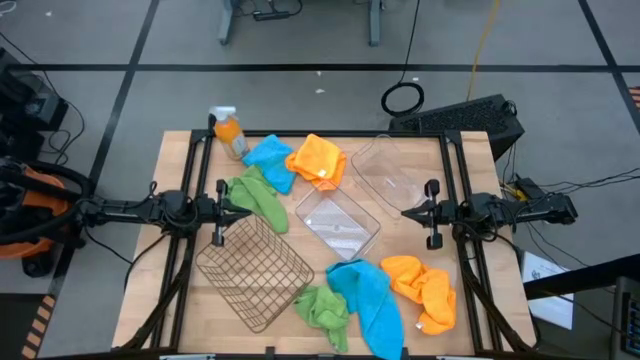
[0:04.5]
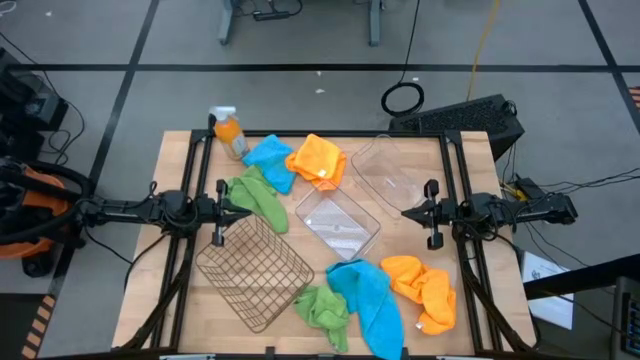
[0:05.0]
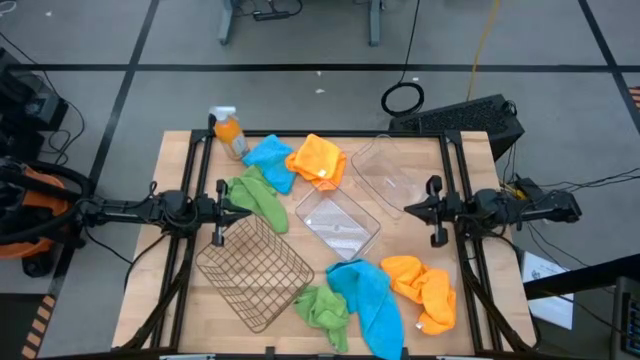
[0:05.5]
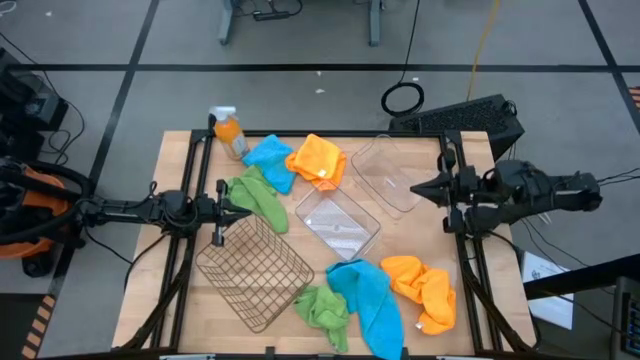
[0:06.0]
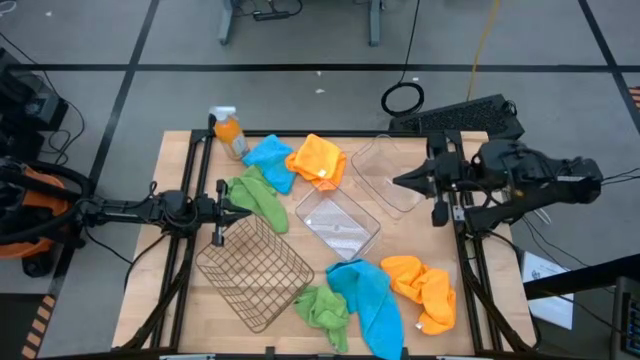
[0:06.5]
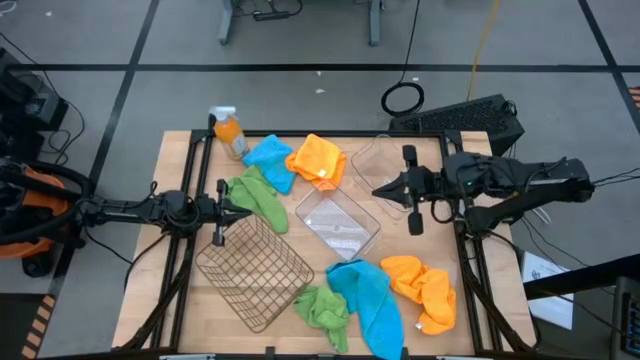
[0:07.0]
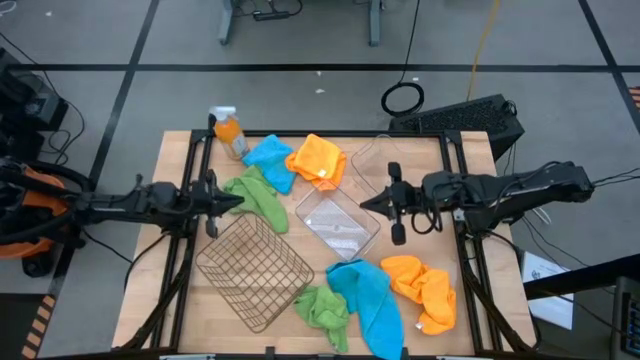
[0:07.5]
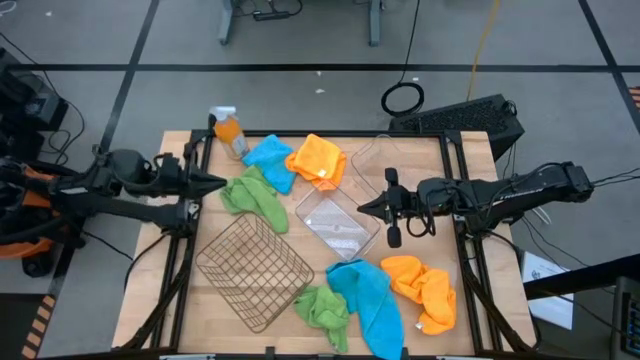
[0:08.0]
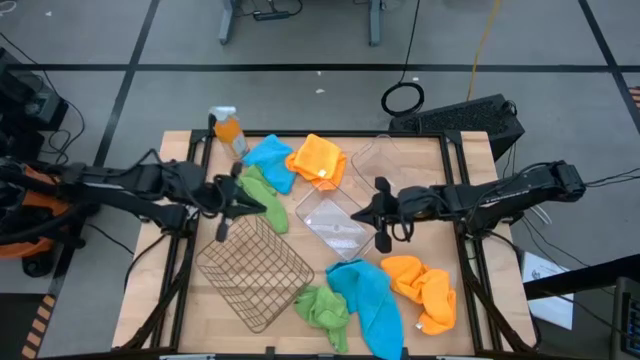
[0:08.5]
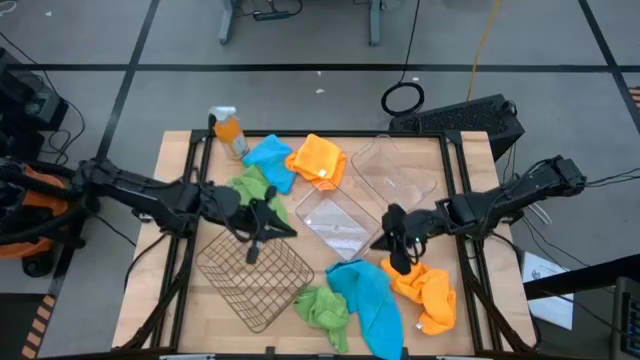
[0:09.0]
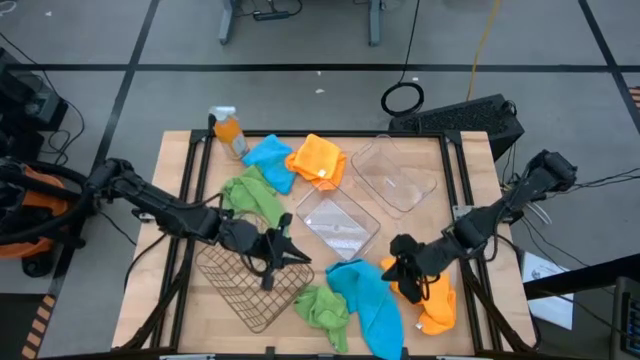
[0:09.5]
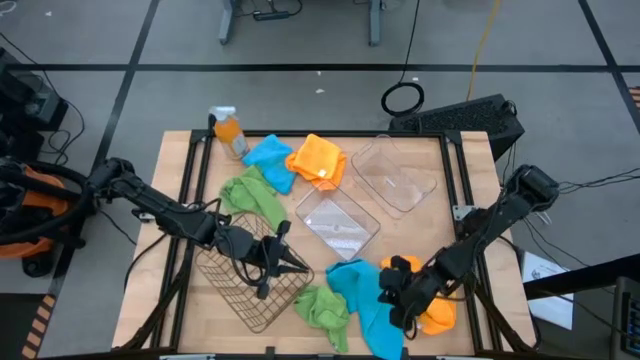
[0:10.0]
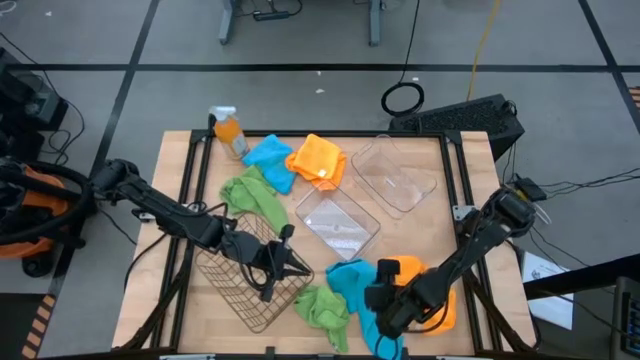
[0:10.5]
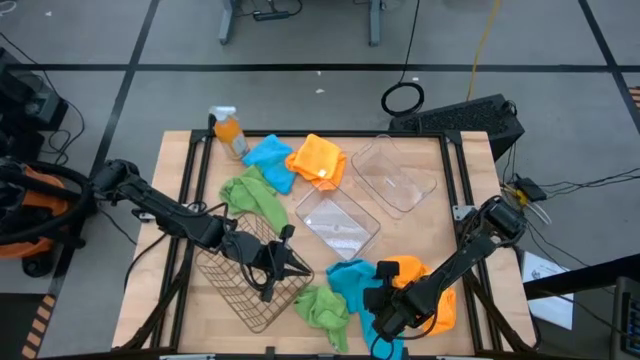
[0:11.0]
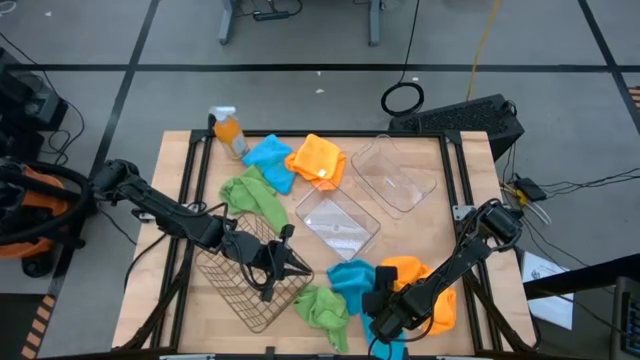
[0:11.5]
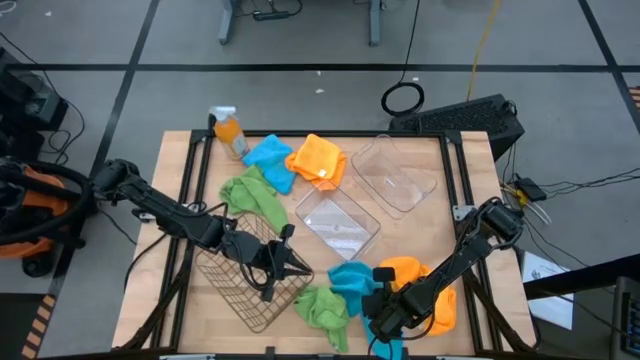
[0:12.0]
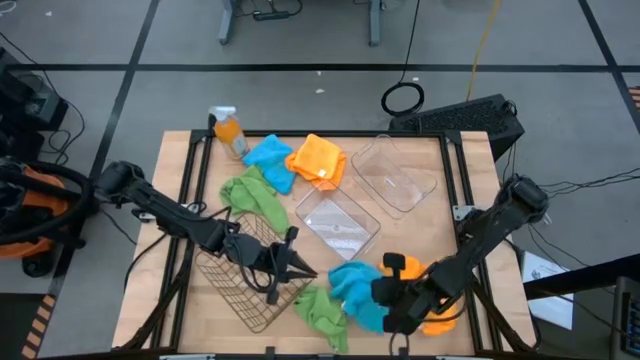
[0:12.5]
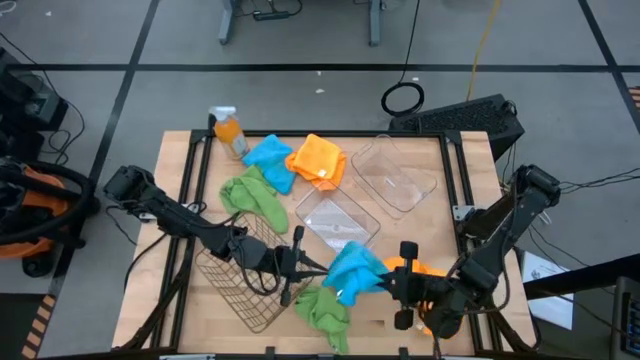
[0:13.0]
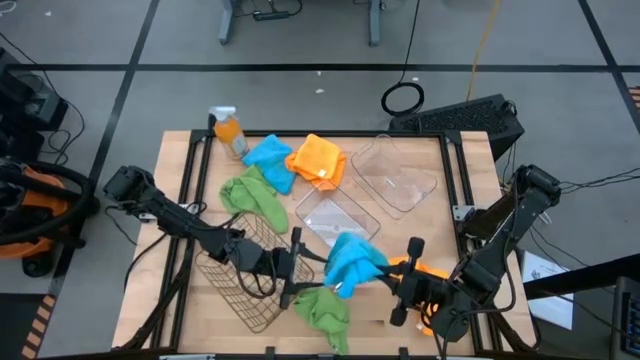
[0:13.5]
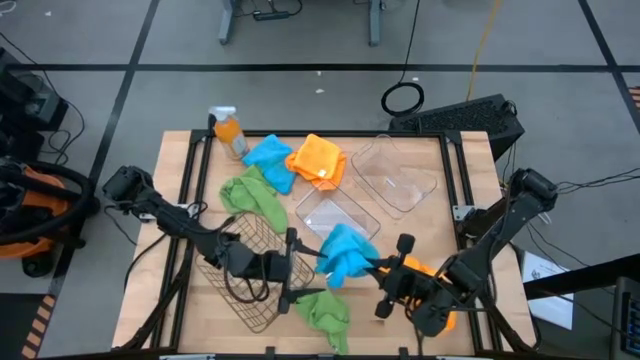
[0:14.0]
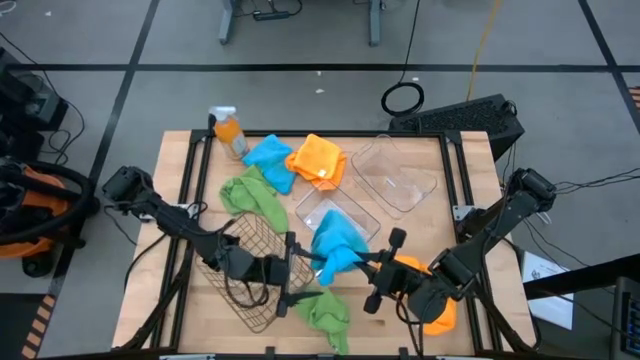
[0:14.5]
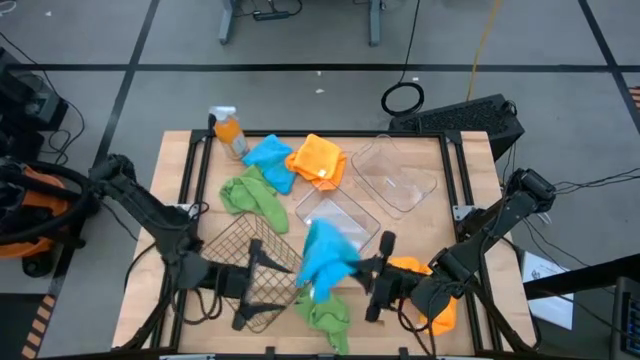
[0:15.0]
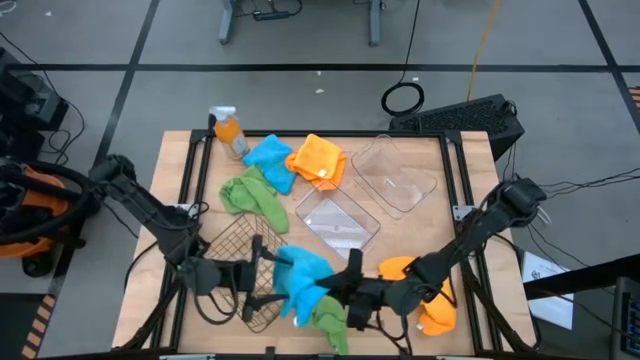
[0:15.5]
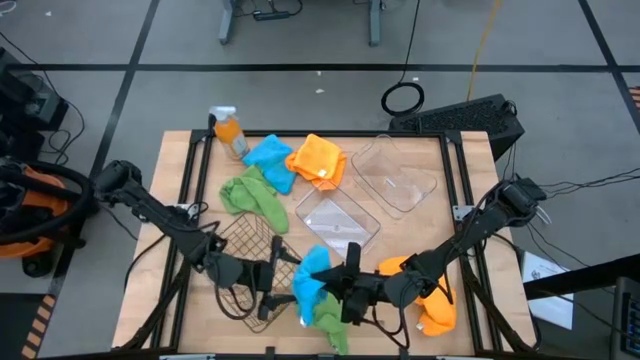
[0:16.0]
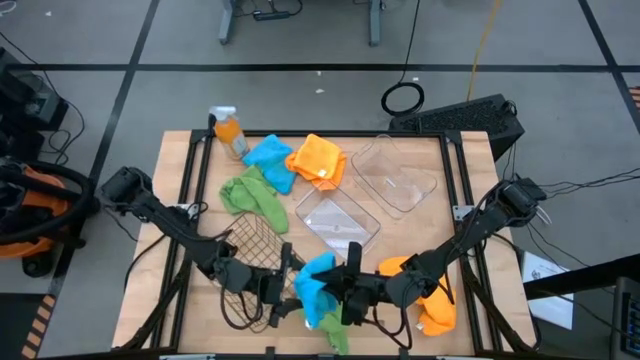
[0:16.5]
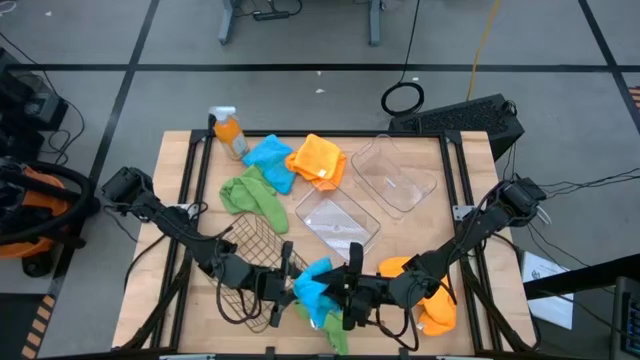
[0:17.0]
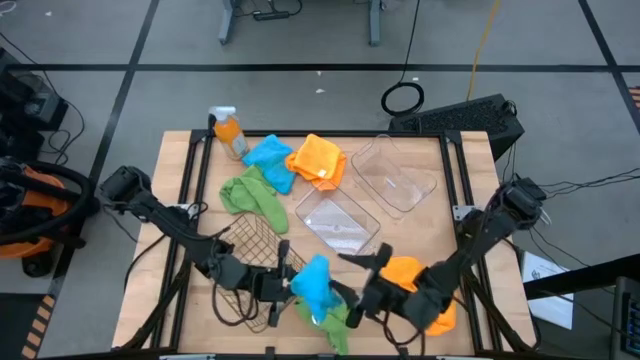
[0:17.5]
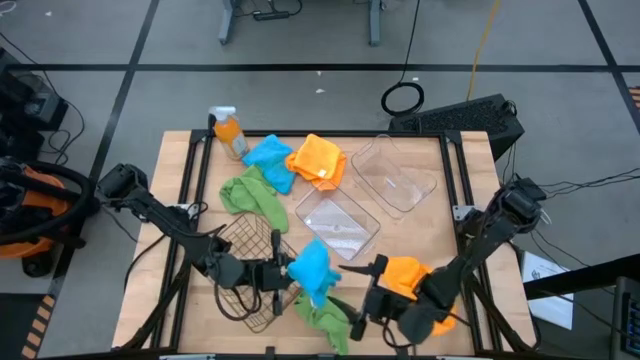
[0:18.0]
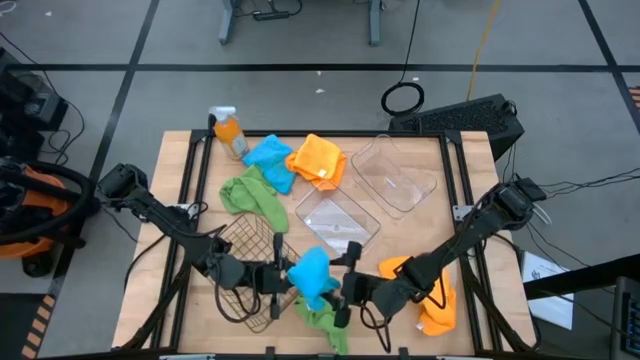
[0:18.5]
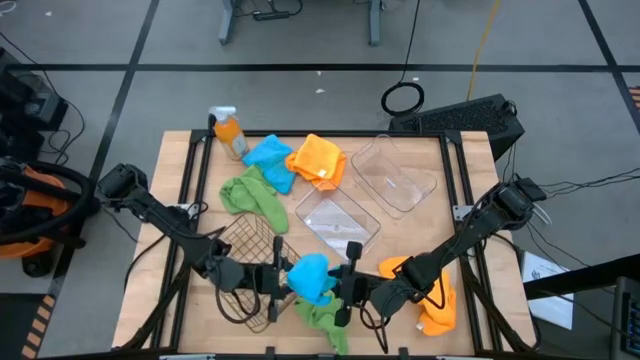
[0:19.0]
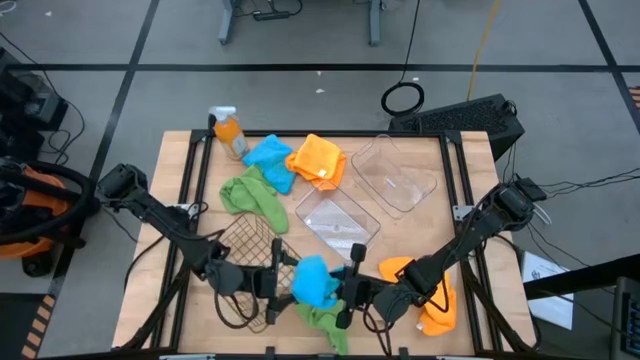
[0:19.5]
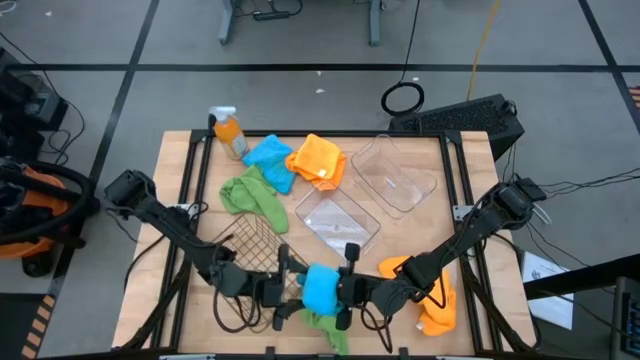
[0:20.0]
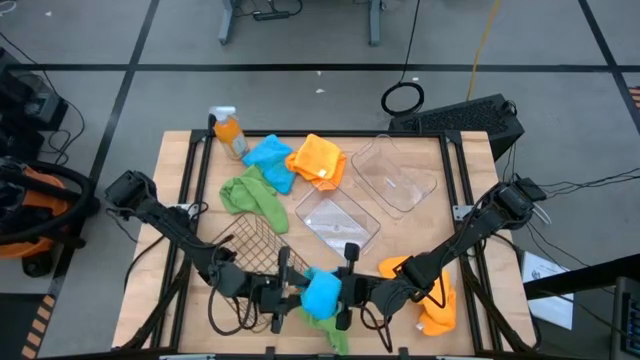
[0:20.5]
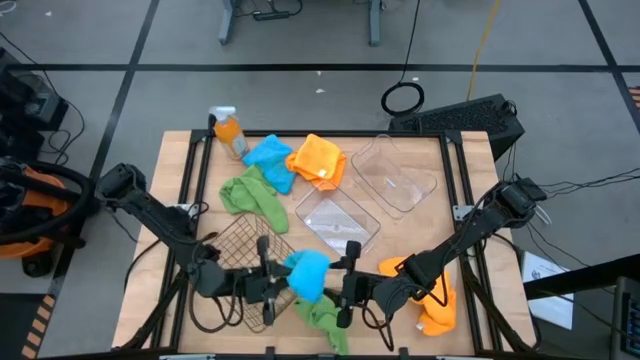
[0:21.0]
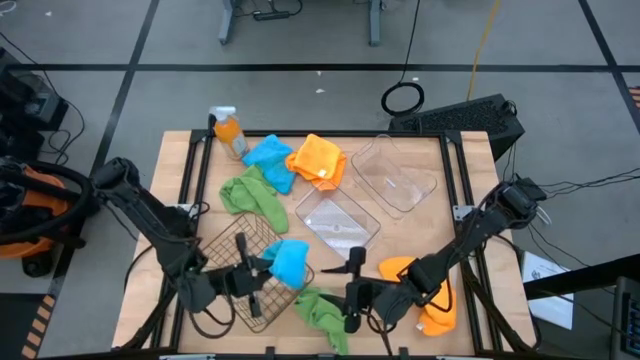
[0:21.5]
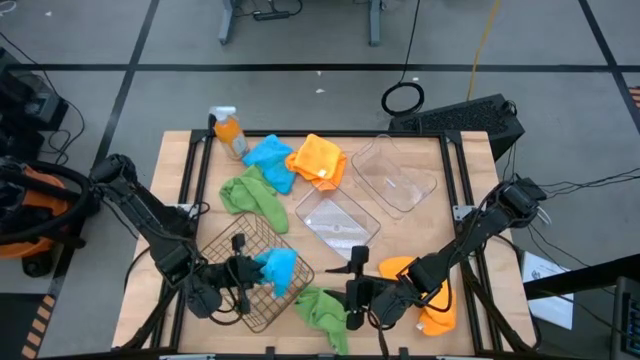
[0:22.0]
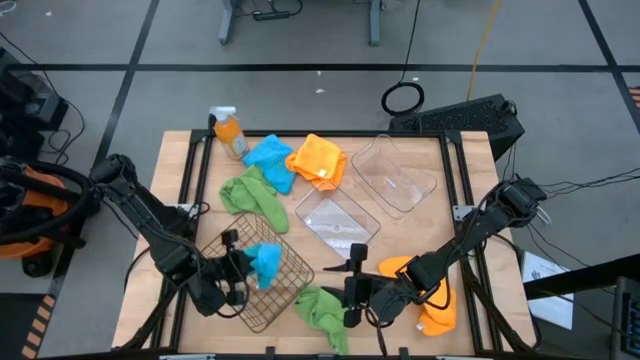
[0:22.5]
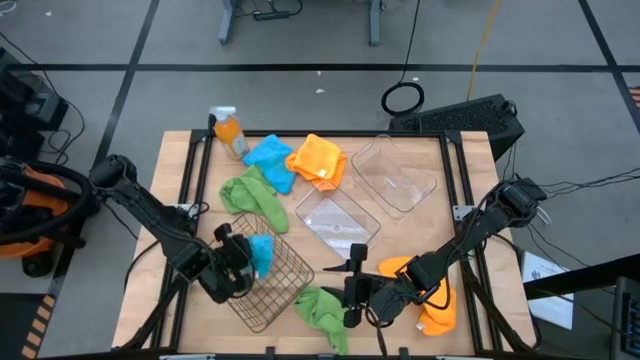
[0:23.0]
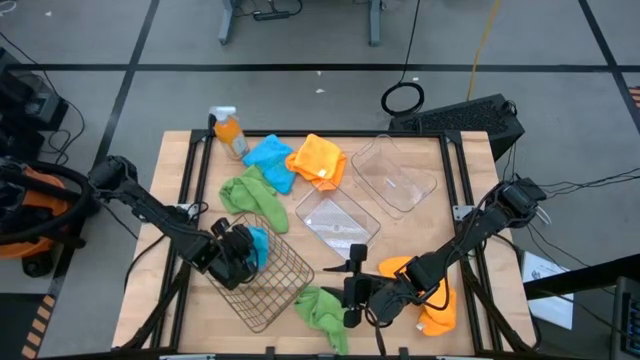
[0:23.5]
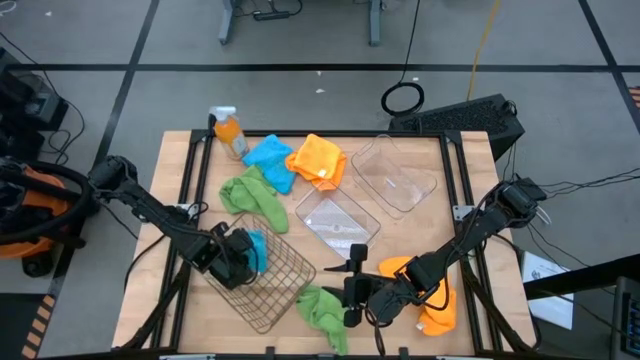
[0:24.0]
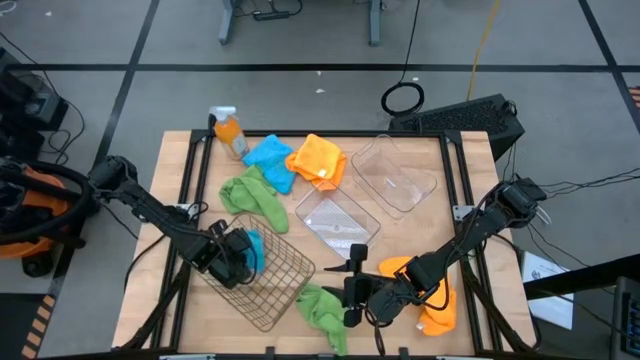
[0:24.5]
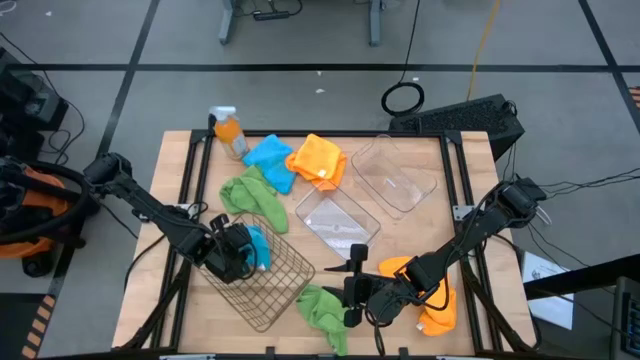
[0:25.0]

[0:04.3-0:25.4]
Task: Sort microfiber towel by color & place in baskets
Put the bottom blue microfiber towel into the wire basket
